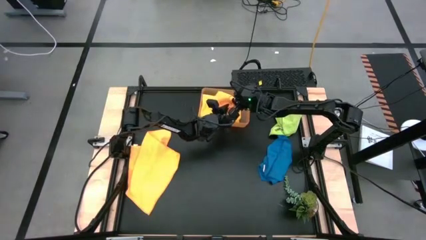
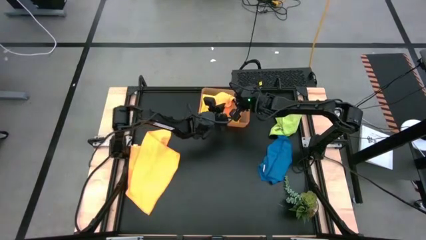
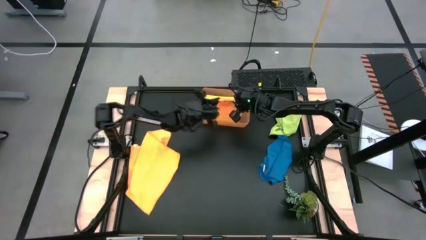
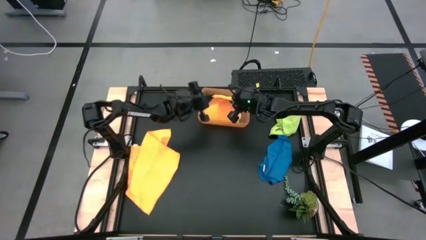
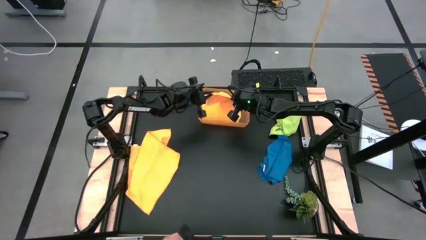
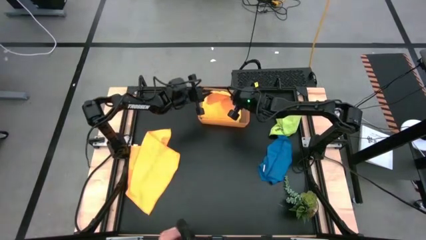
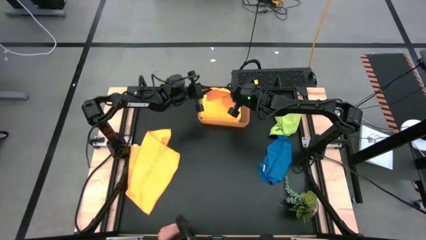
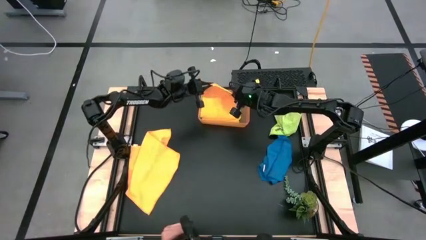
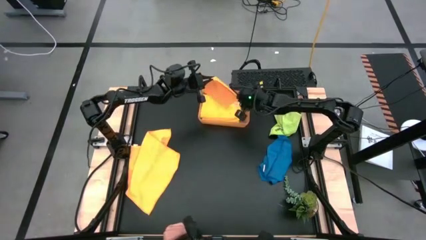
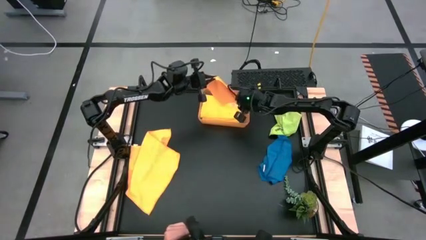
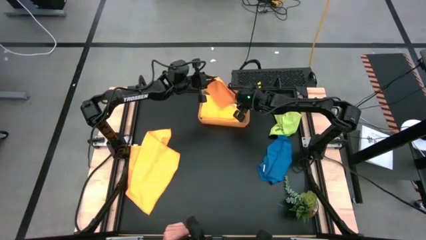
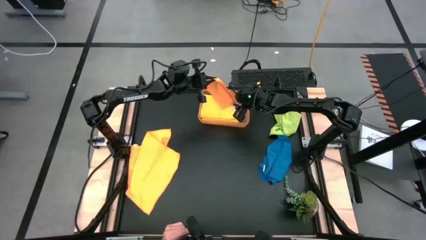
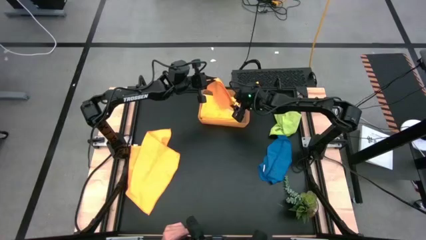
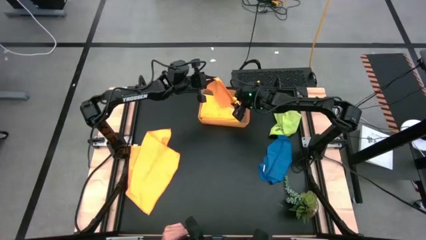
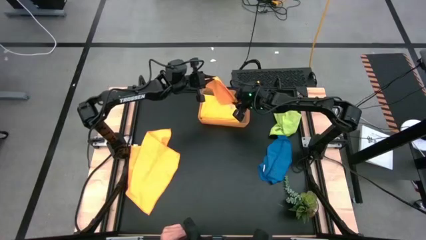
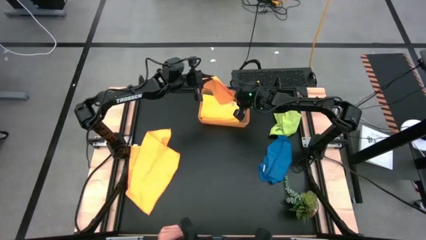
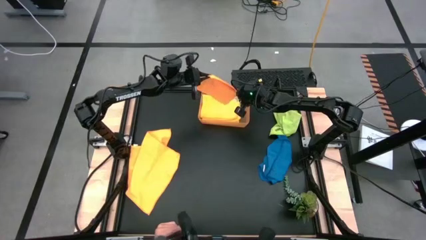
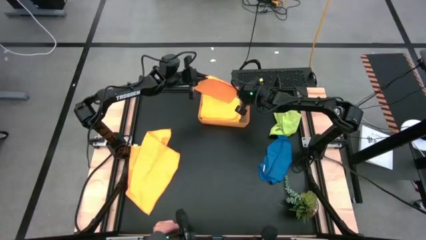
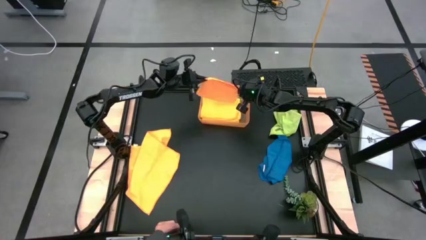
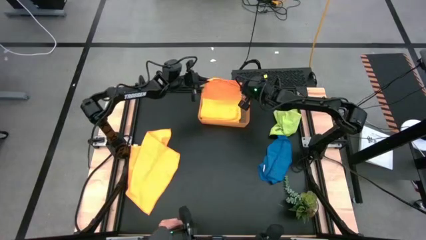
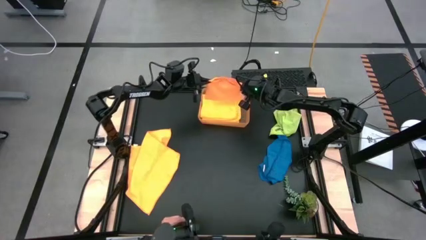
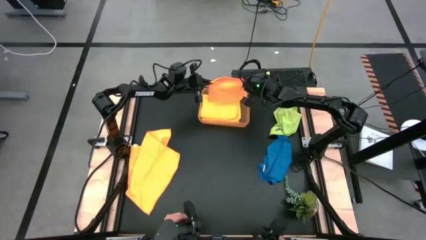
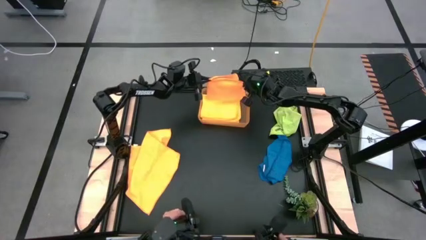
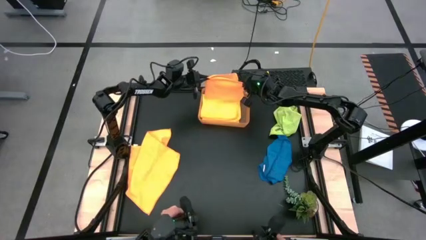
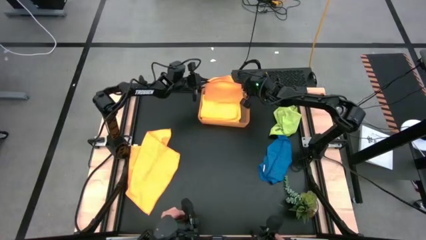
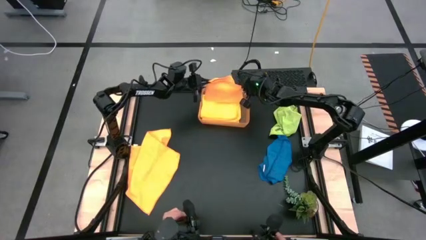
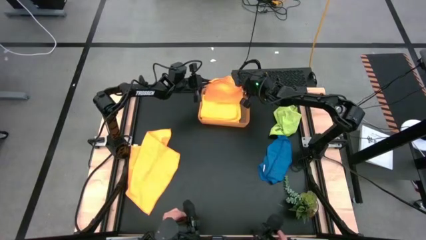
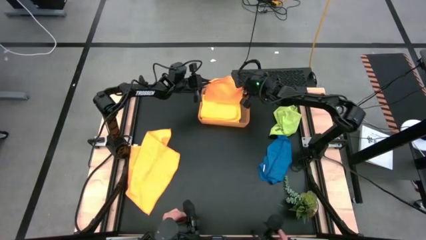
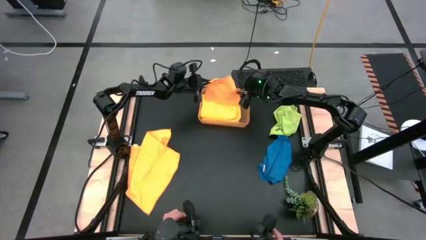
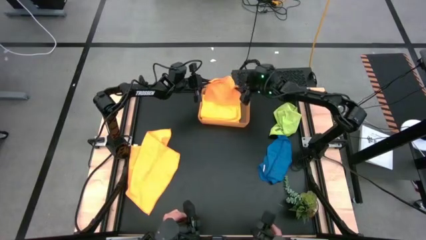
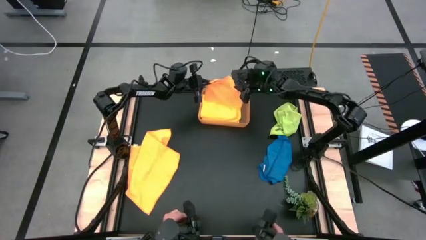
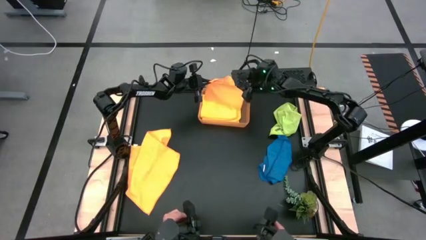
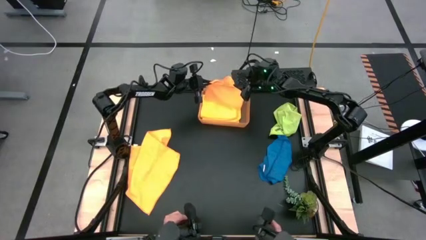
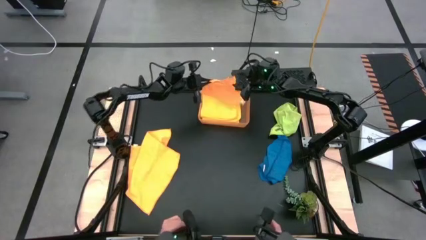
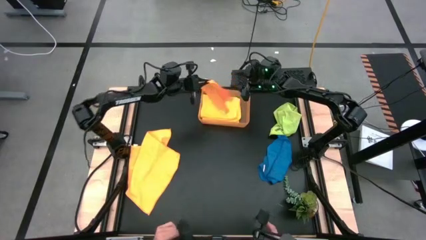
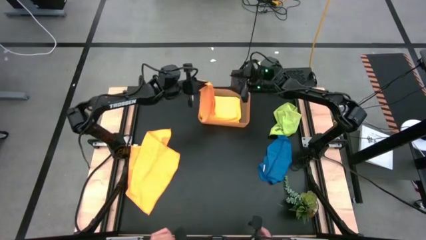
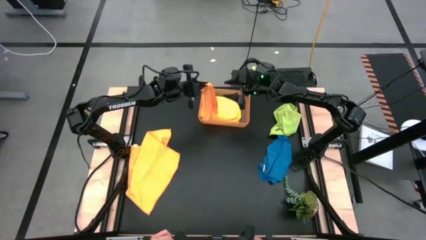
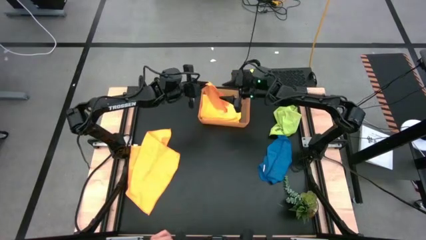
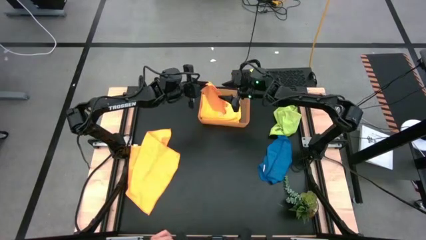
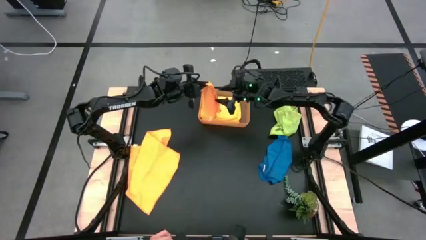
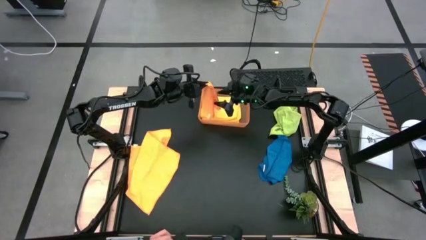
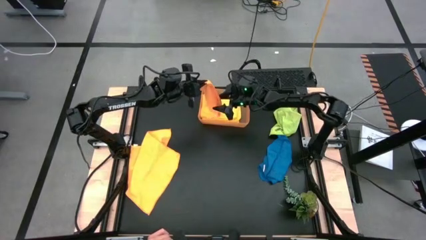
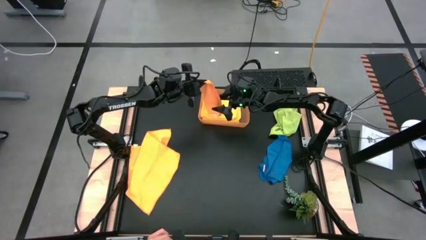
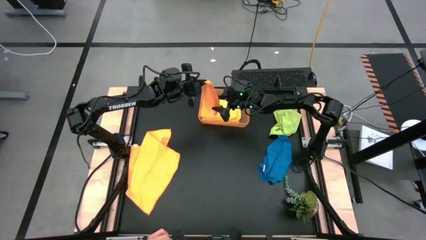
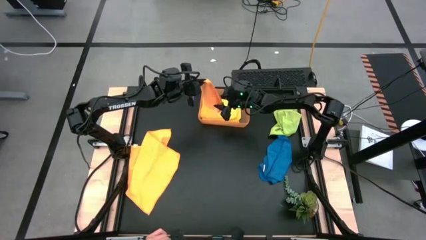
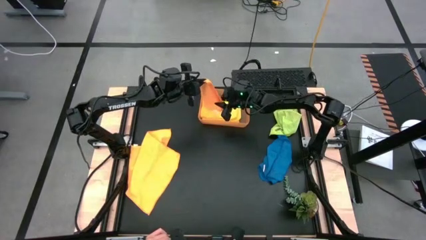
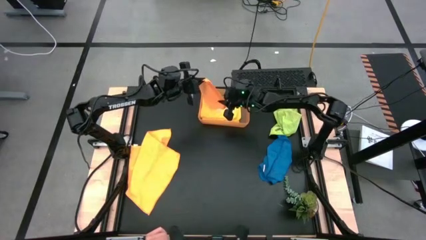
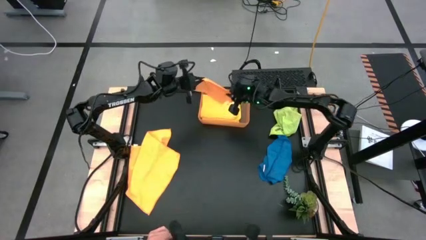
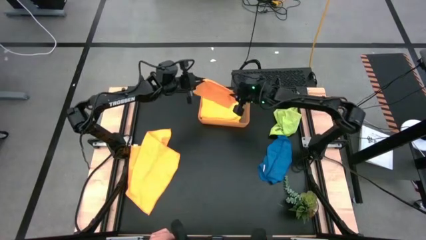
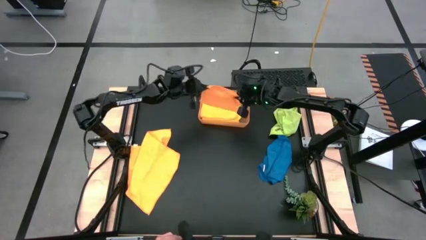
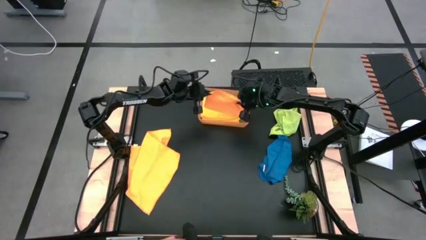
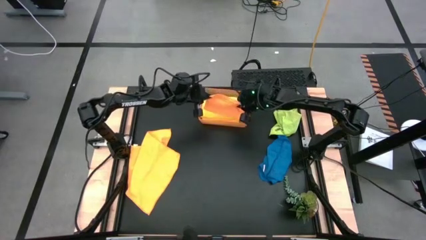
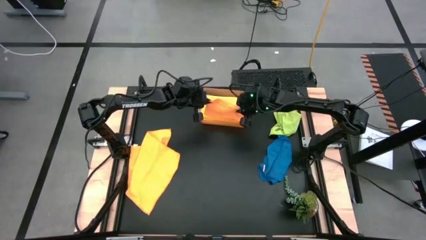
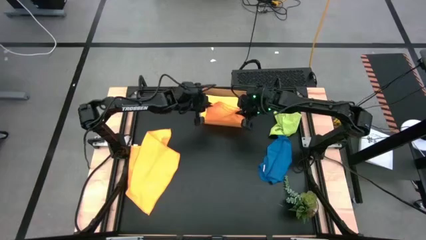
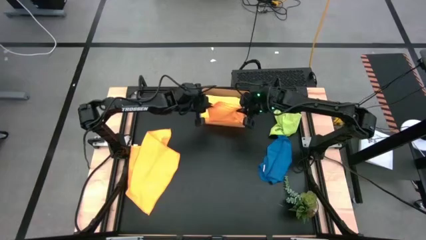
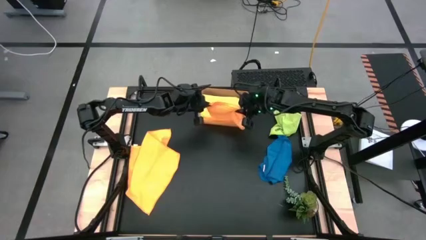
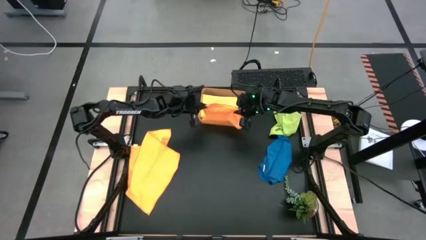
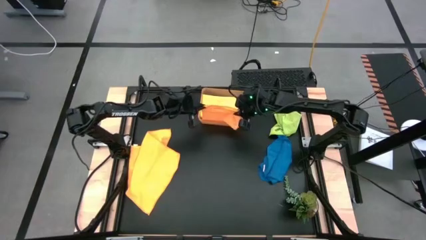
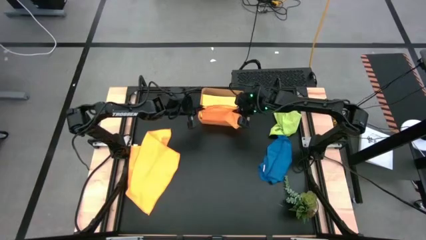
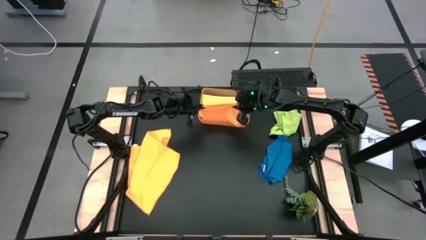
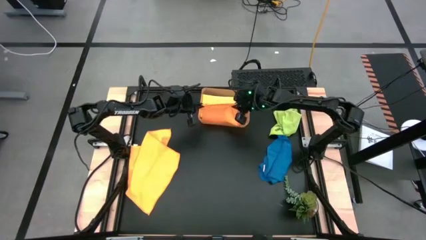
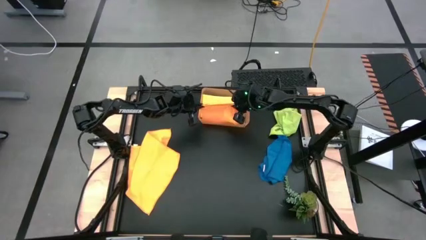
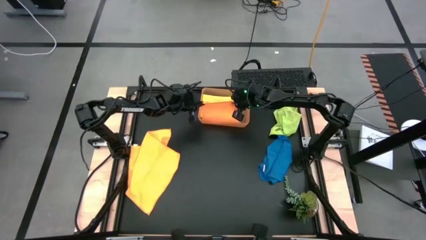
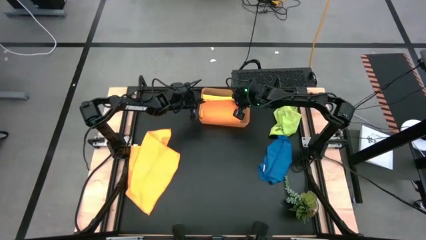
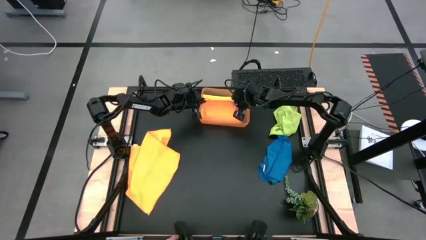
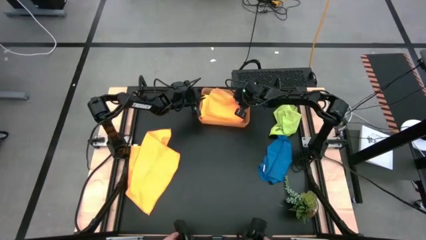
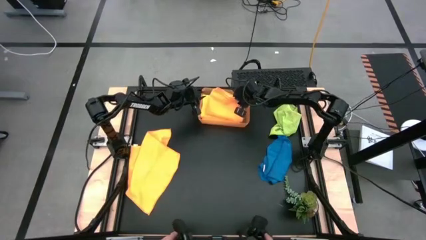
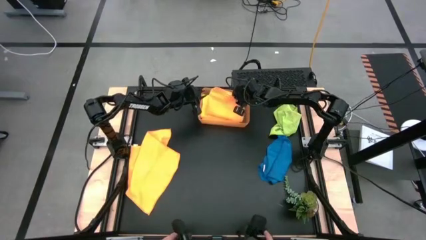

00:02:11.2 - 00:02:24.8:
Task: Fold microfiber towels
Put the orange towel in the orange bin
